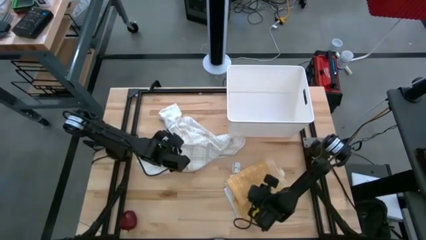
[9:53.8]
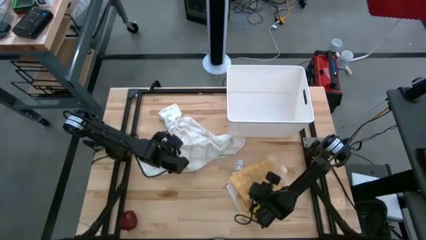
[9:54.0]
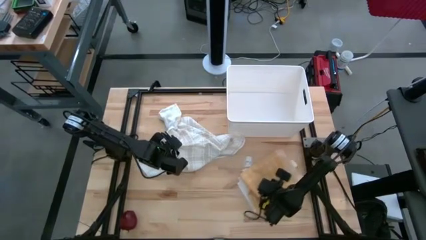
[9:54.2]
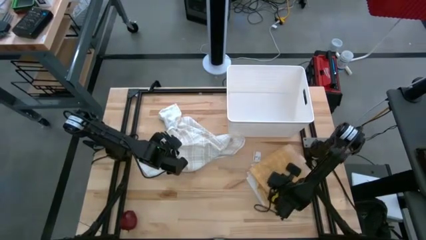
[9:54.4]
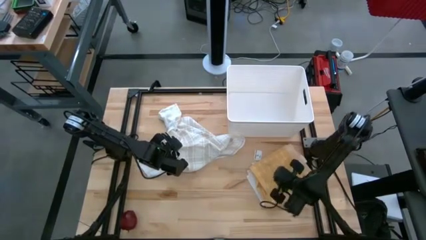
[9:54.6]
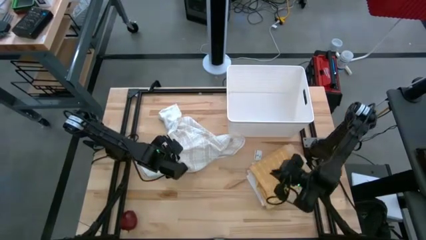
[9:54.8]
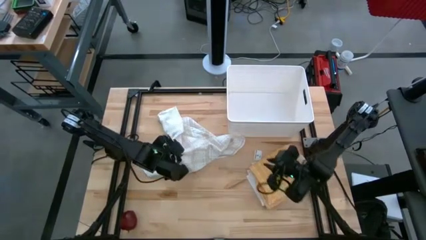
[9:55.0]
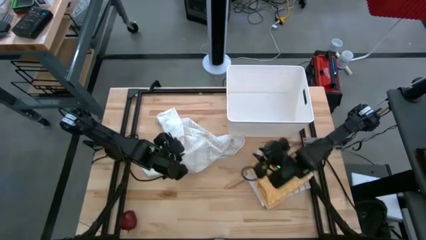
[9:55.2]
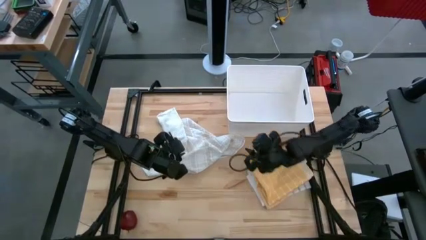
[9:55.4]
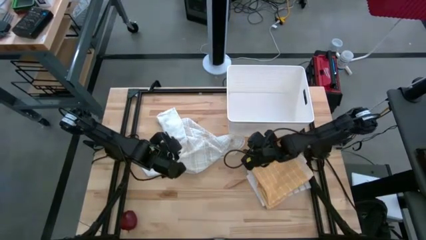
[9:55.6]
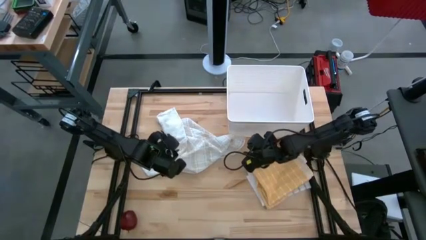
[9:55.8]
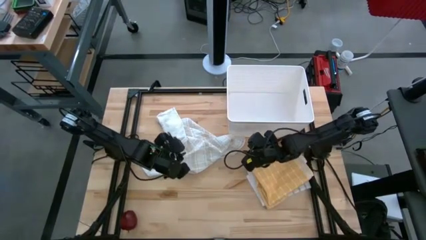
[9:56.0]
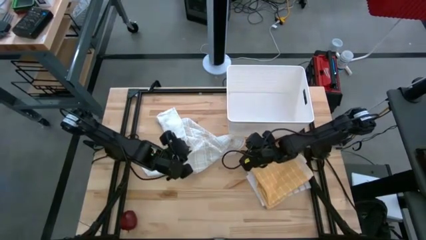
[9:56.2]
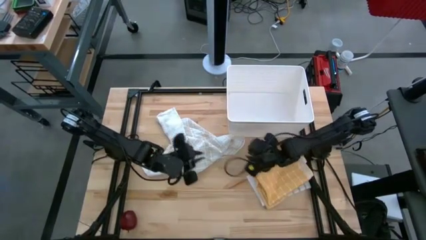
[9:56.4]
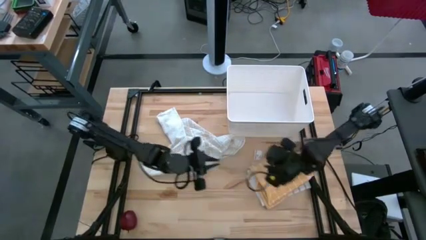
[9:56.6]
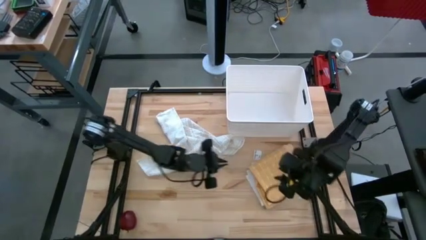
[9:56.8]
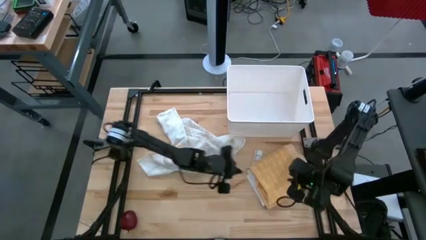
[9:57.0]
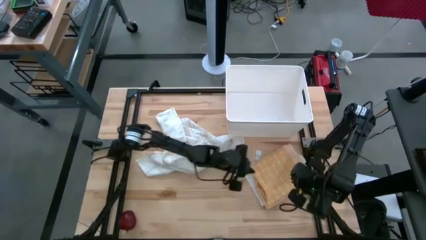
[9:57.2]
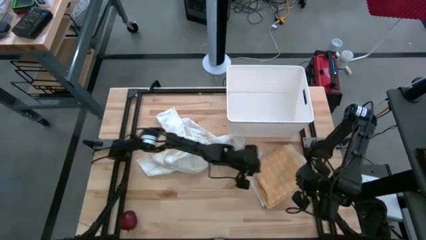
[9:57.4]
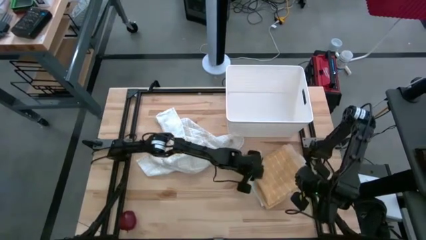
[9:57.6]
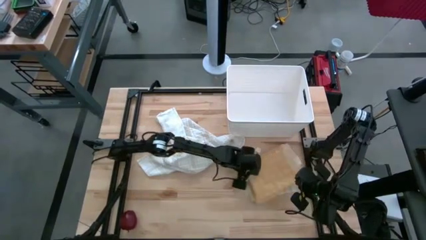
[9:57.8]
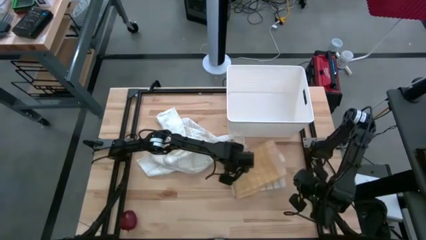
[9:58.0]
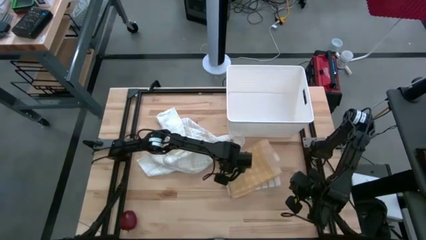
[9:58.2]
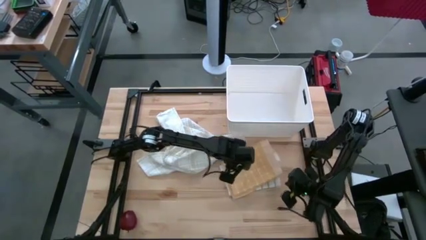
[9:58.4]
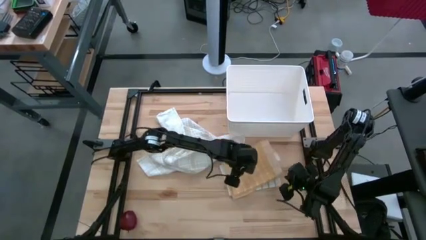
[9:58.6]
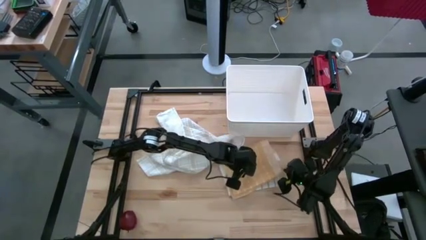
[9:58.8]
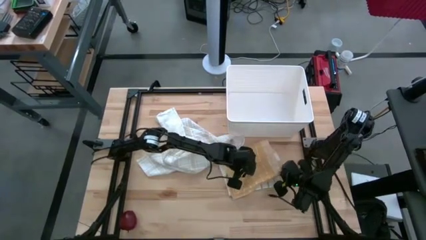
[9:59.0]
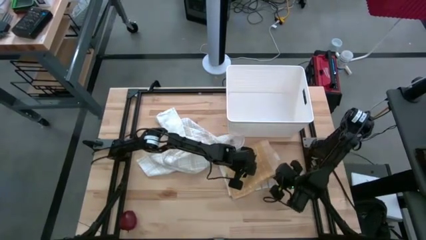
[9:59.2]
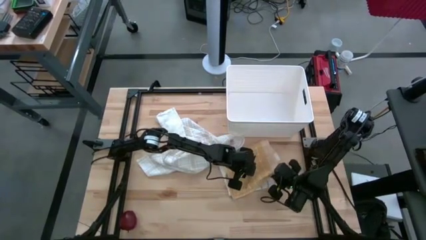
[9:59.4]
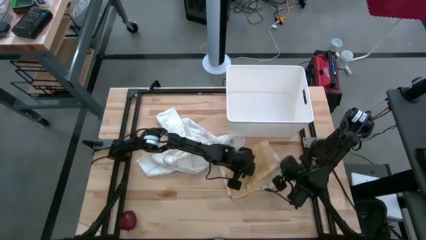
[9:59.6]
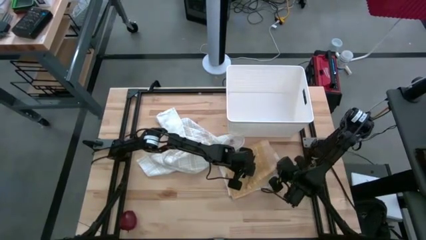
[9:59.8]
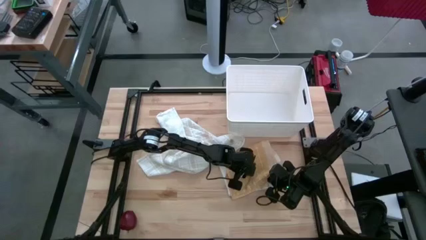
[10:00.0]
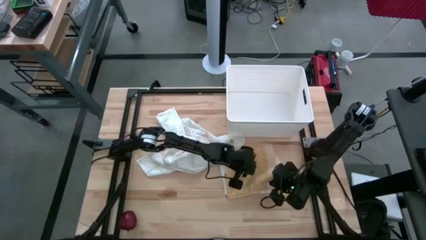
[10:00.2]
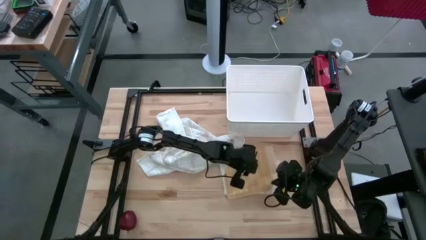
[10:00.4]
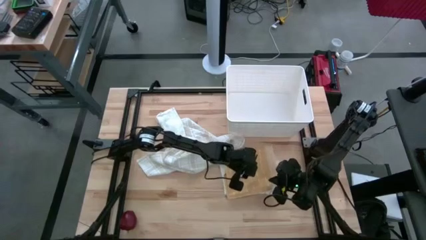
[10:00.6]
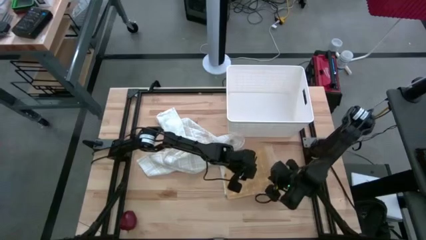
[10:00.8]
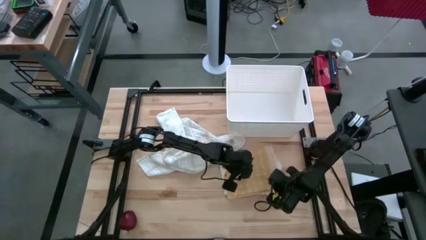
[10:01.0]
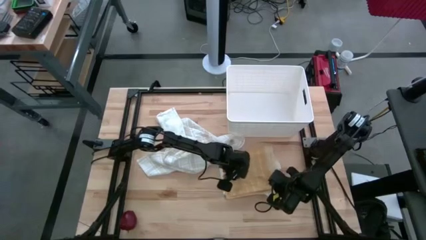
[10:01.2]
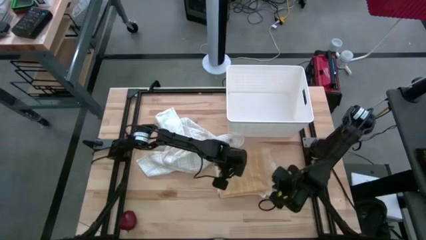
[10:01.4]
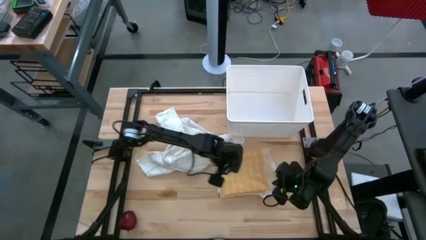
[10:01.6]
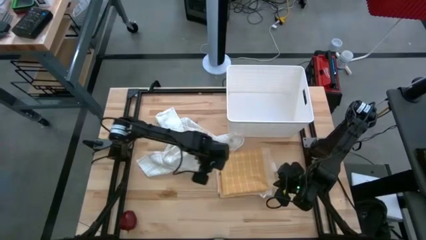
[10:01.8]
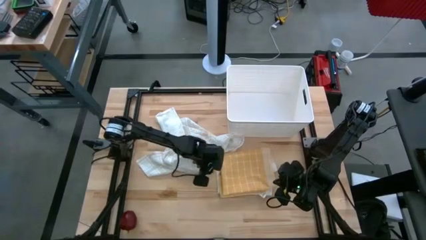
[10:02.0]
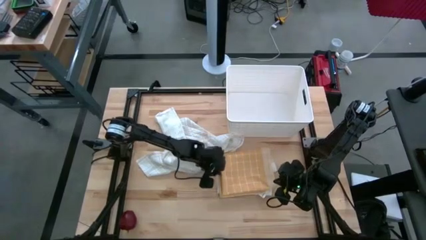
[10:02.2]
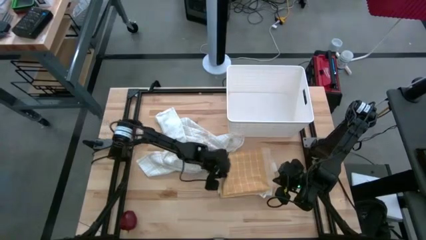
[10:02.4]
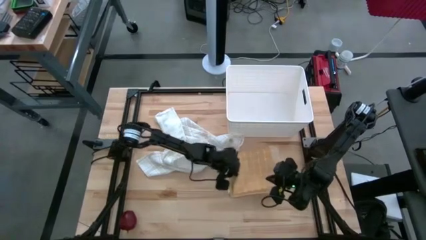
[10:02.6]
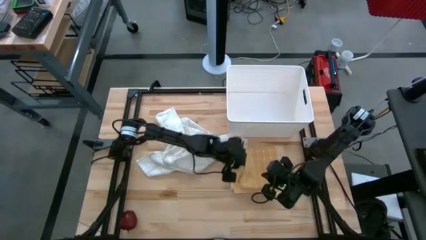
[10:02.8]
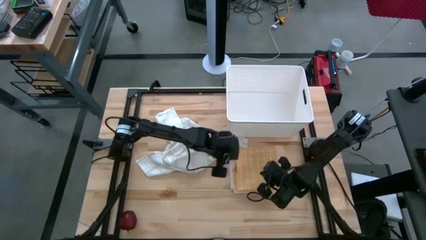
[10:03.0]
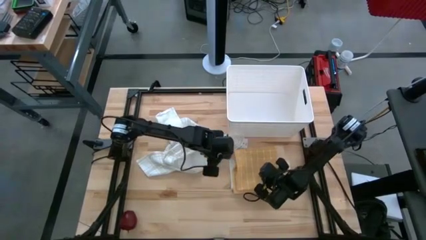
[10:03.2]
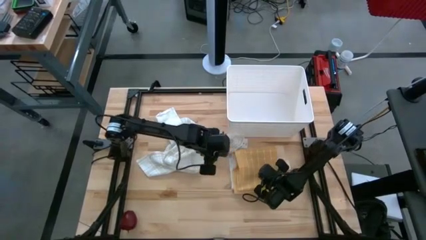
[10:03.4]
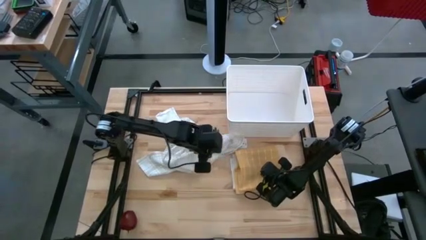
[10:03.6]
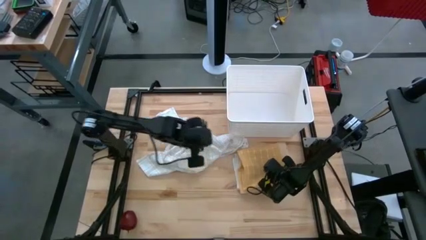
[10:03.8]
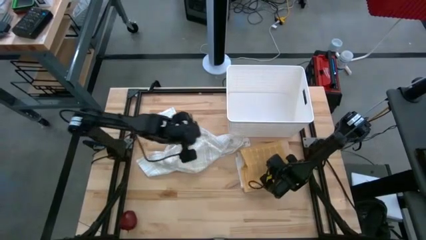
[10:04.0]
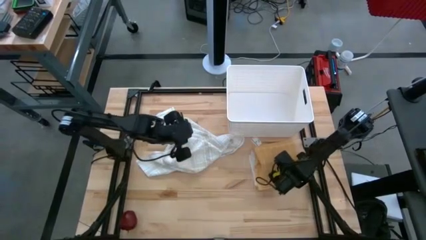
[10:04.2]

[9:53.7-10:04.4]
Task: Fold towel
Adjust the stack of folded towels

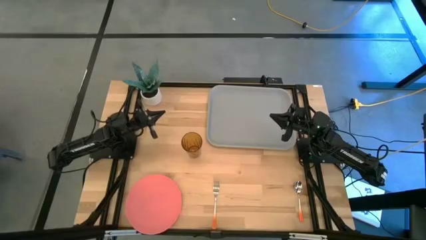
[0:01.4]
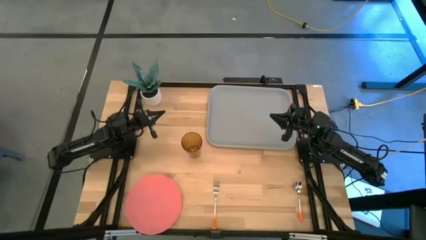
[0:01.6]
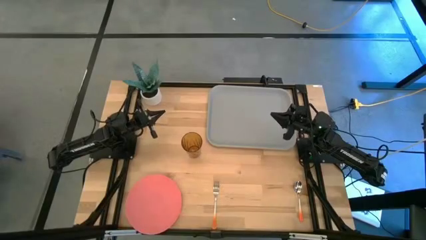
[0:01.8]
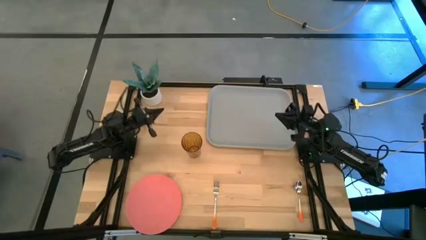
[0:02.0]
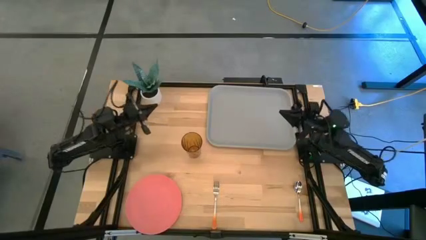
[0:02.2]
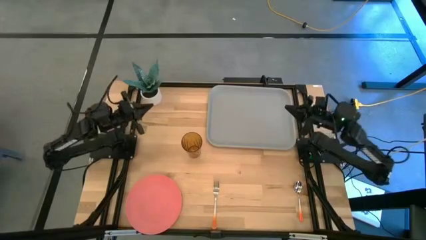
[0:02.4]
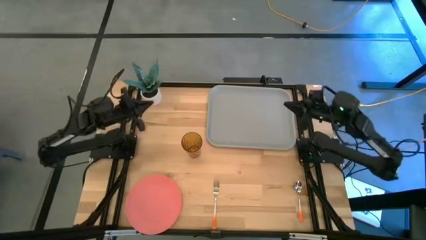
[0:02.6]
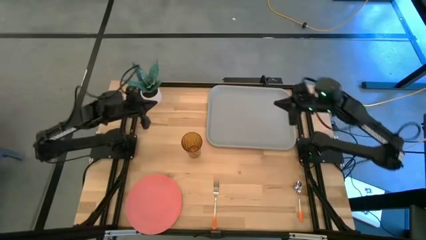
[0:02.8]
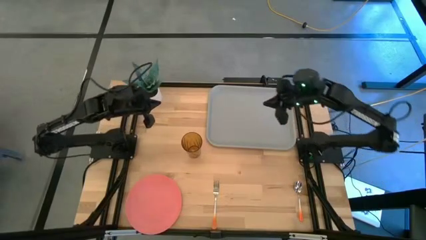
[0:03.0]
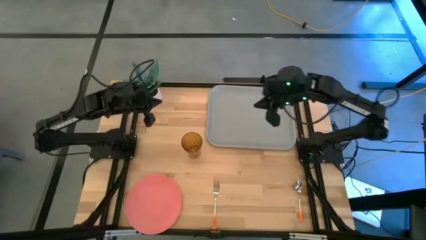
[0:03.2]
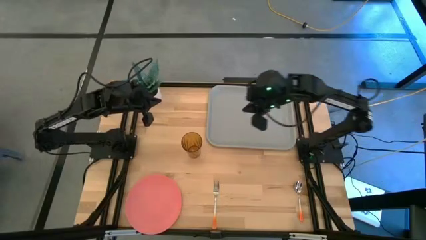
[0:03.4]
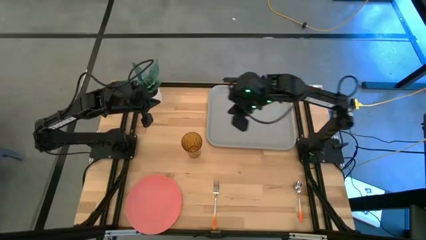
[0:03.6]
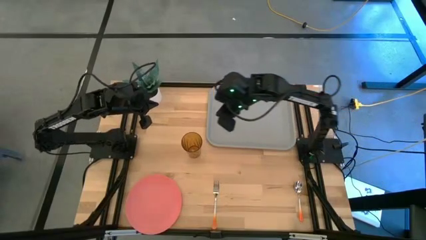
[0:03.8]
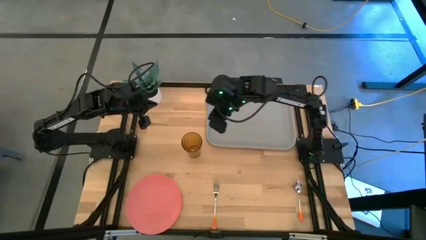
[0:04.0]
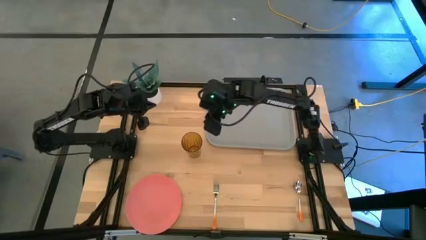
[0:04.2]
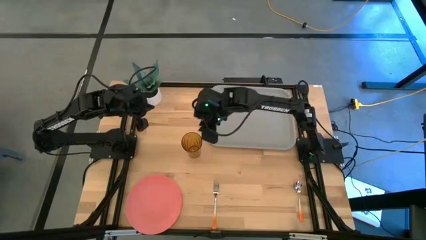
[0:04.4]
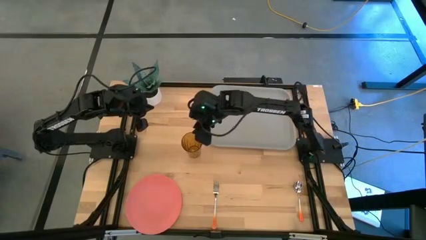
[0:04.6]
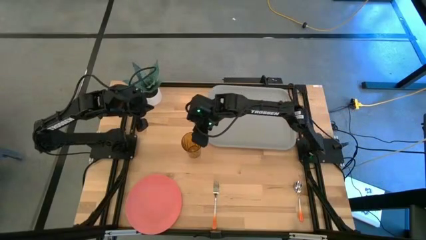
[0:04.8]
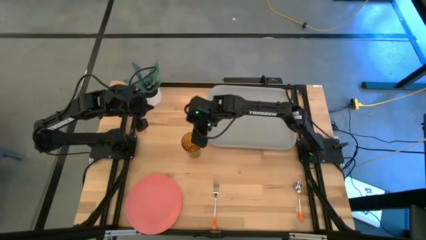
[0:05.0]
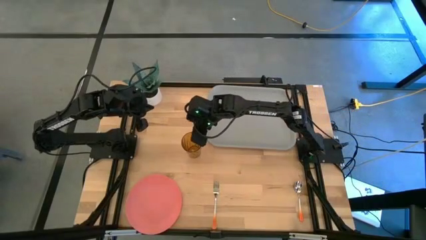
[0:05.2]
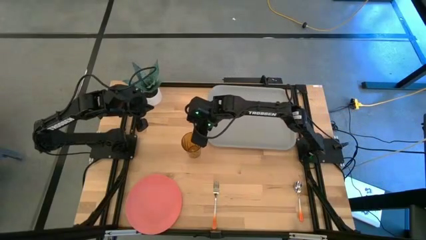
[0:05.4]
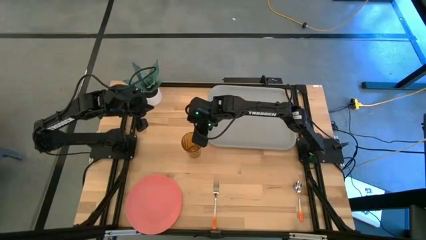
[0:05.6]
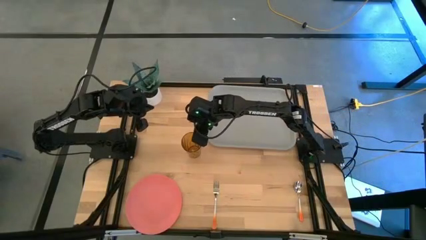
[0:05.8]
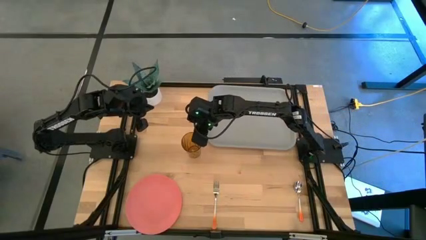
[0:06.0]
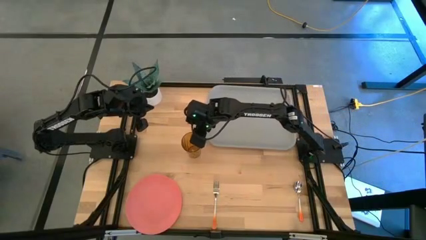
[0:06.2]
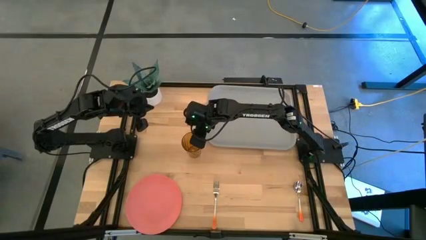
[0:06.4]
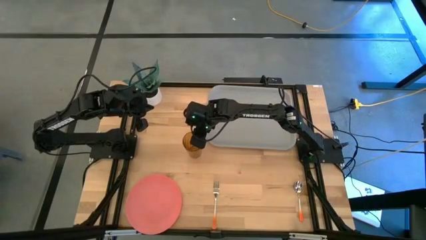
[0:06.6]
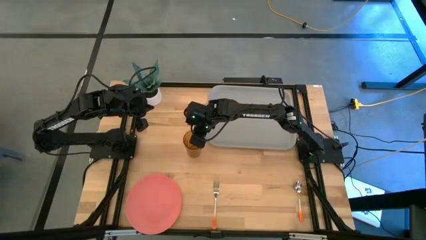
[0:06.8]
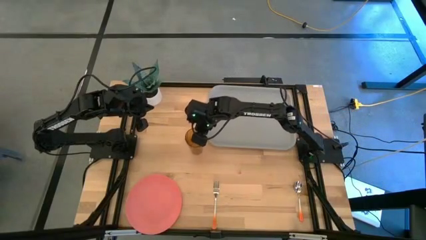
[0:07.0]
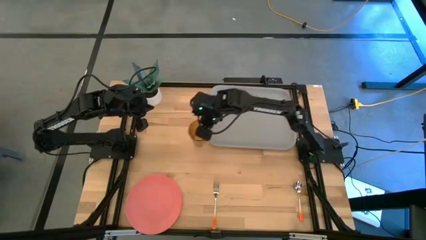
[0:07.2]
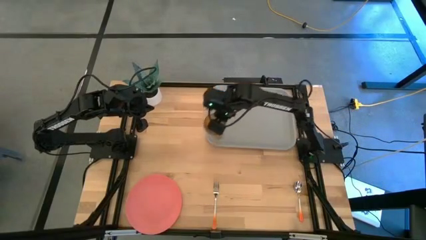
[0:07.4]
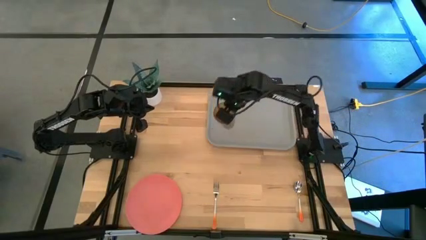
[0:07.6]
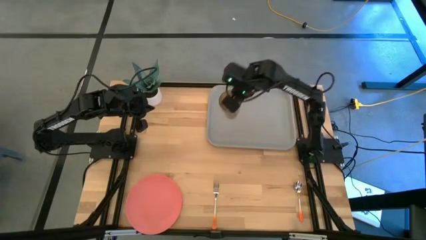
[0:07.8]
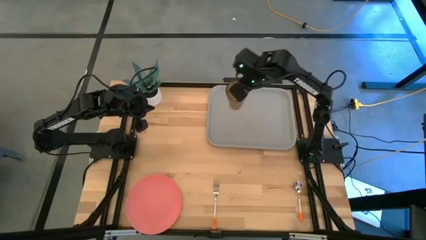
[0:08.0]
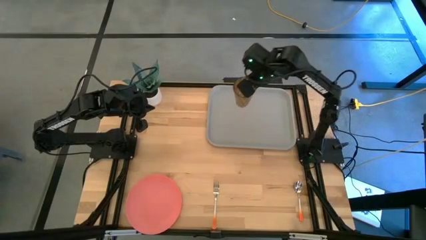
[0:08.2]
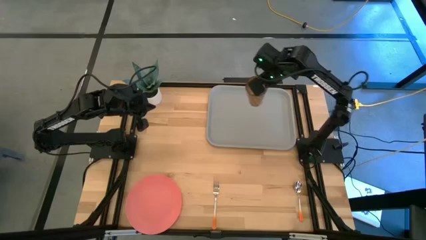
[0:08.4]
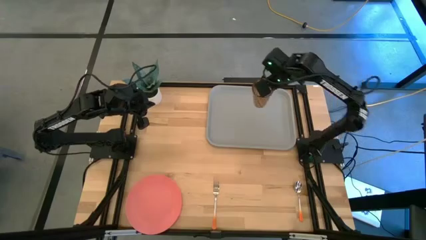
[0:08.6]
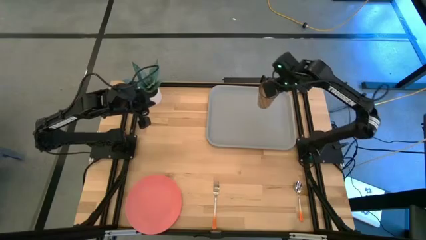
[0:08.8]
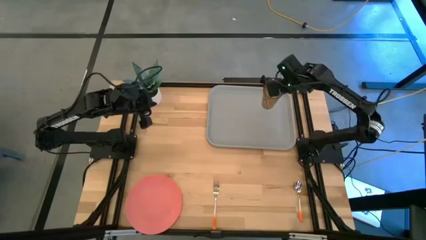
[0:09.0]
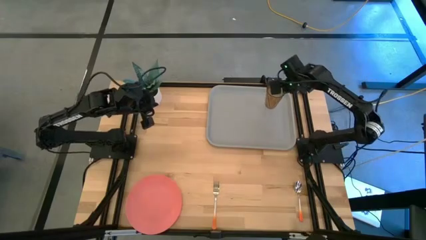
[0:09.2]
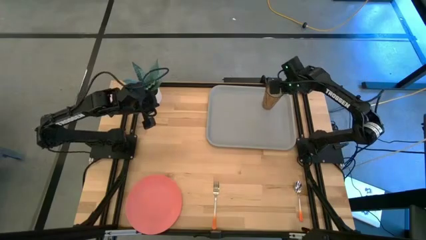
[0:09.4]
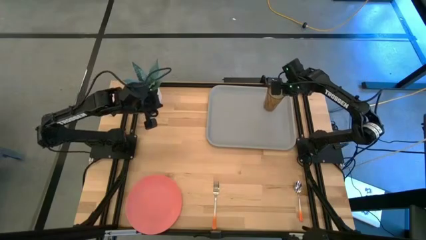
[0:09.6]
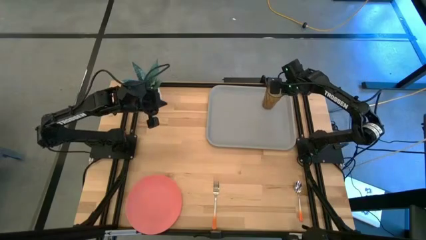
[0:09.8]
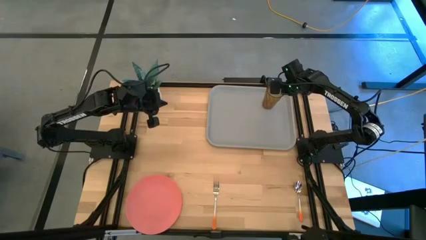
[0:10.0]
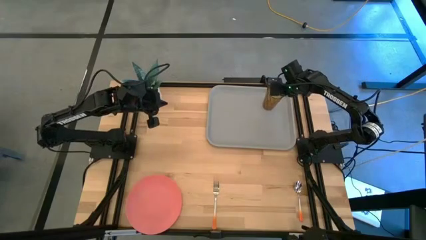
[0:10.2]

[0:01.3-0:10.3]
Task: Pick and place plate/cup/fork/spoon on tray
Put the brown cup on the top right of the gray serving tray
